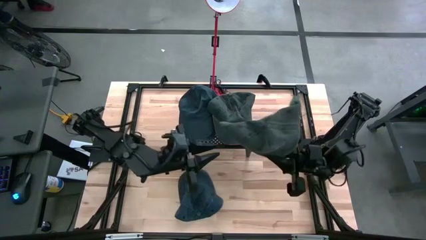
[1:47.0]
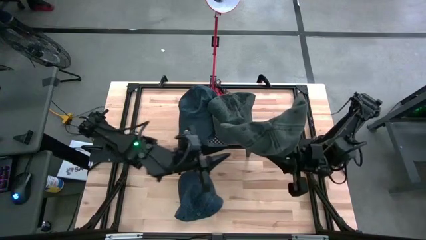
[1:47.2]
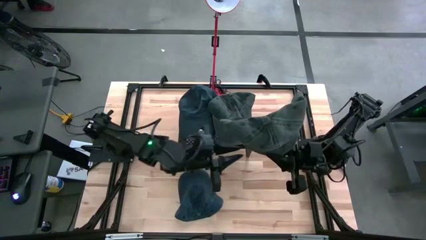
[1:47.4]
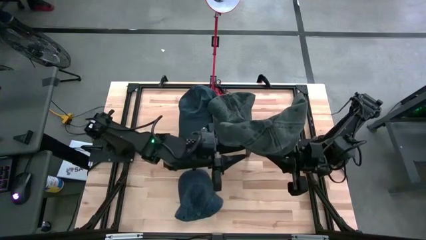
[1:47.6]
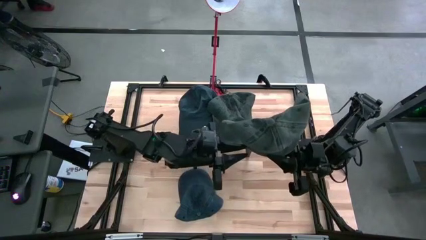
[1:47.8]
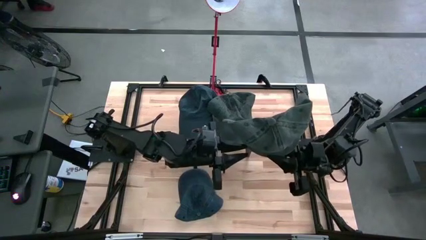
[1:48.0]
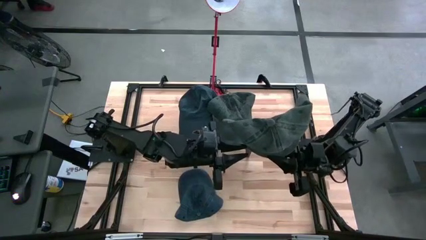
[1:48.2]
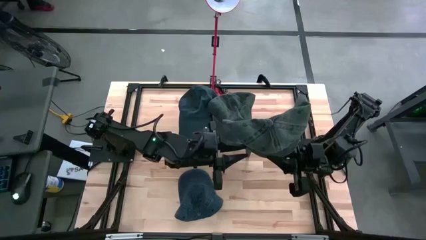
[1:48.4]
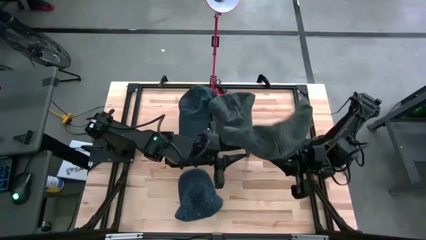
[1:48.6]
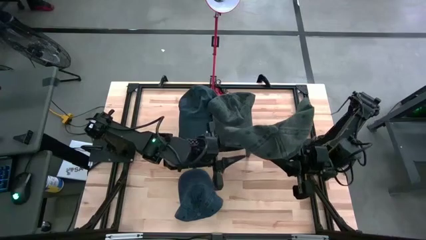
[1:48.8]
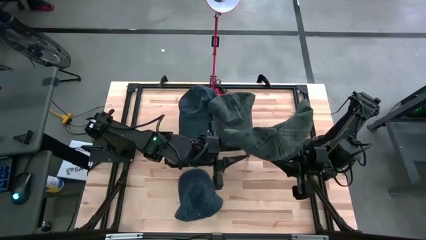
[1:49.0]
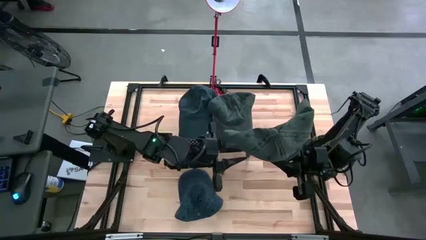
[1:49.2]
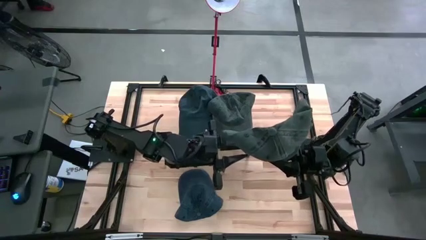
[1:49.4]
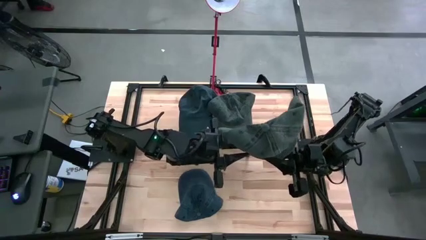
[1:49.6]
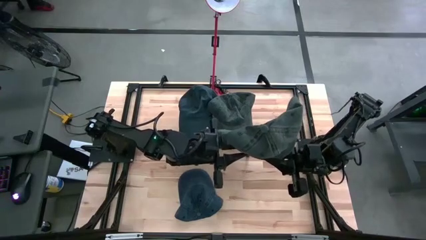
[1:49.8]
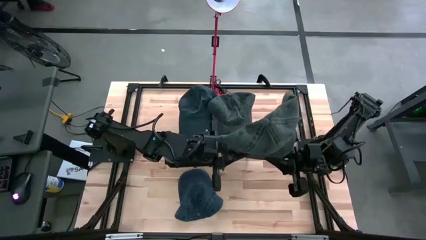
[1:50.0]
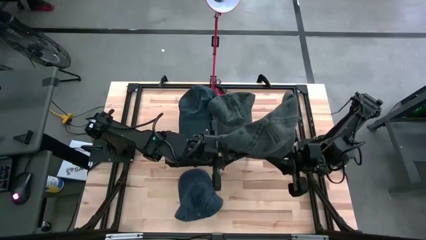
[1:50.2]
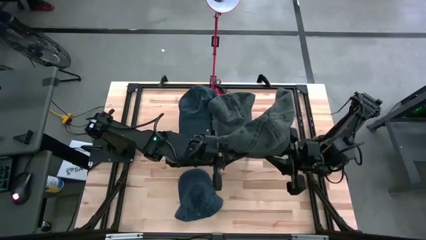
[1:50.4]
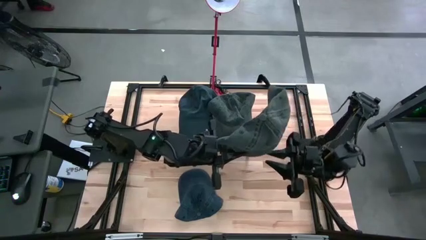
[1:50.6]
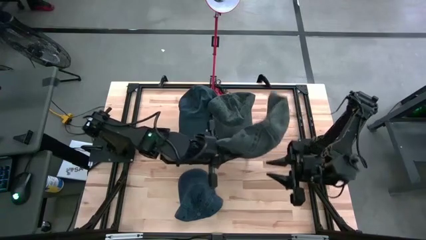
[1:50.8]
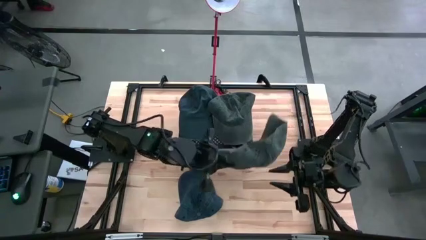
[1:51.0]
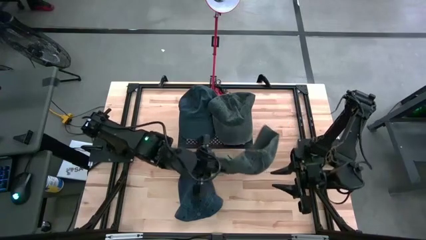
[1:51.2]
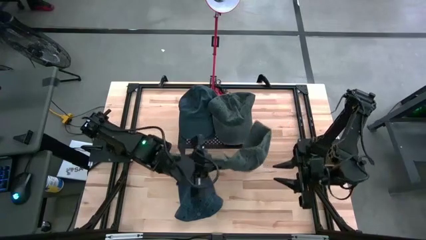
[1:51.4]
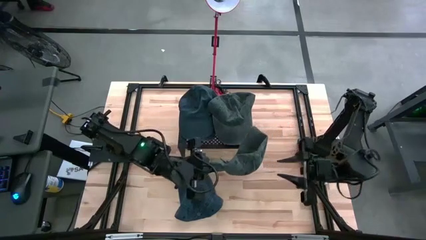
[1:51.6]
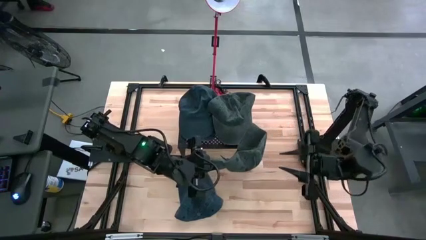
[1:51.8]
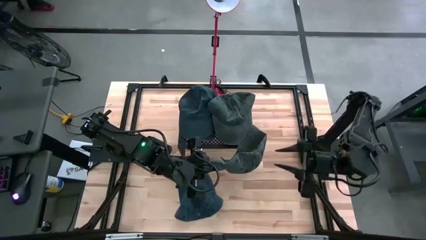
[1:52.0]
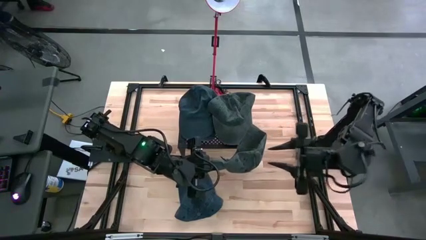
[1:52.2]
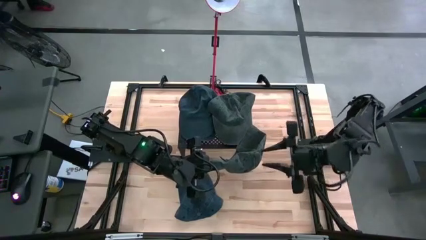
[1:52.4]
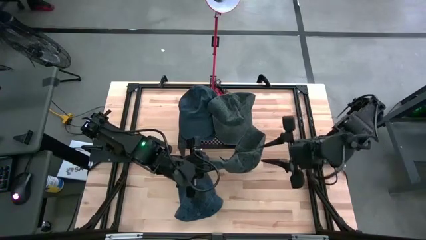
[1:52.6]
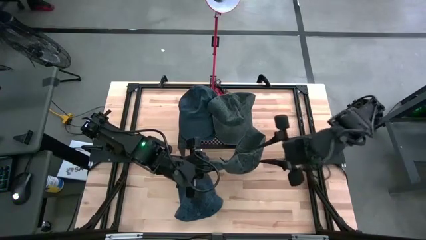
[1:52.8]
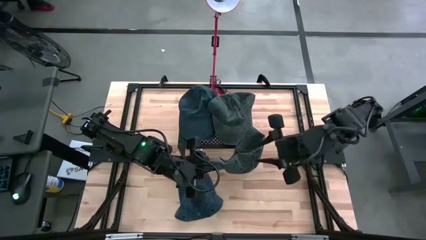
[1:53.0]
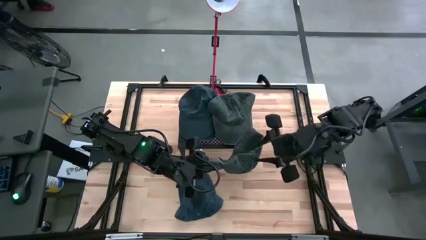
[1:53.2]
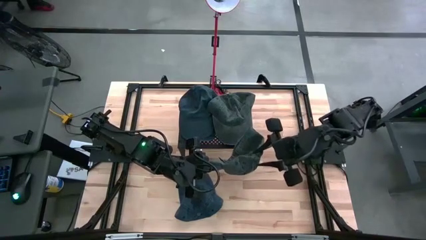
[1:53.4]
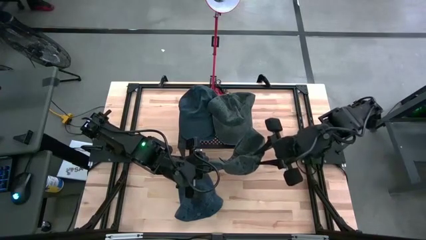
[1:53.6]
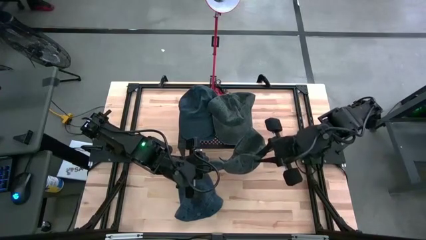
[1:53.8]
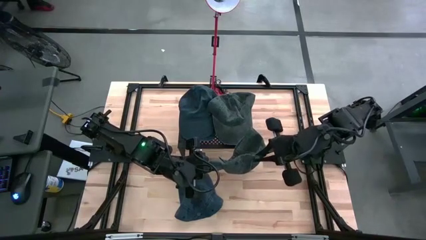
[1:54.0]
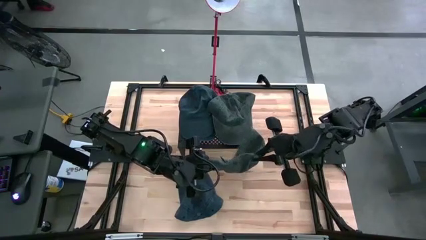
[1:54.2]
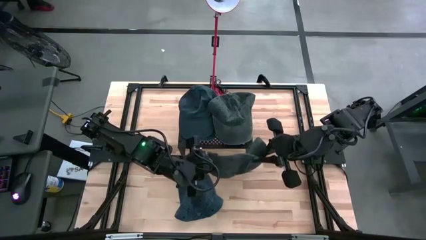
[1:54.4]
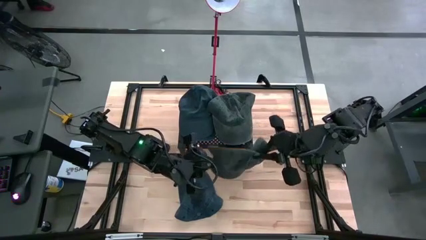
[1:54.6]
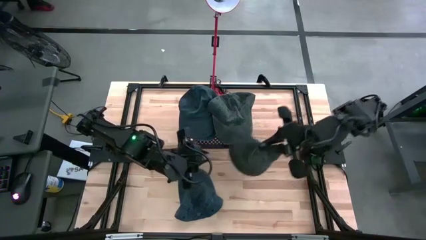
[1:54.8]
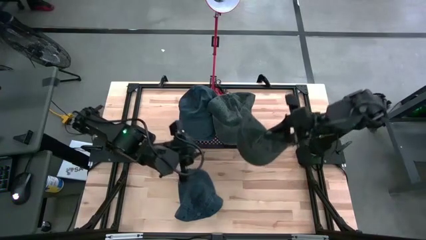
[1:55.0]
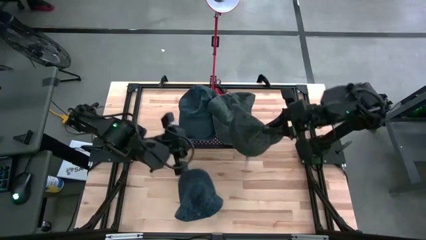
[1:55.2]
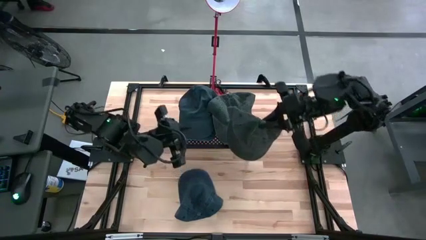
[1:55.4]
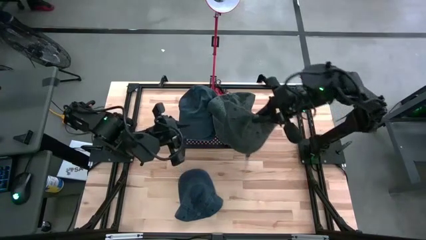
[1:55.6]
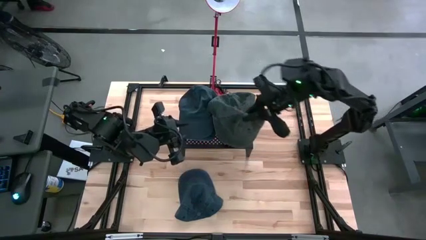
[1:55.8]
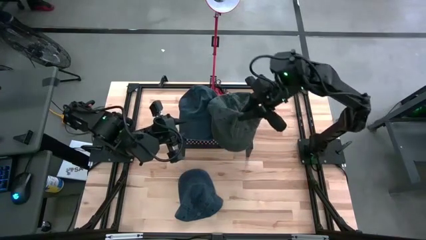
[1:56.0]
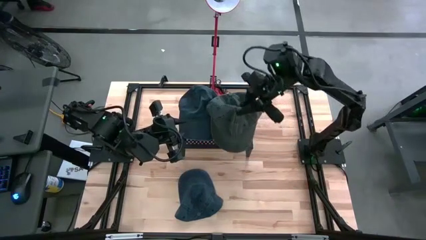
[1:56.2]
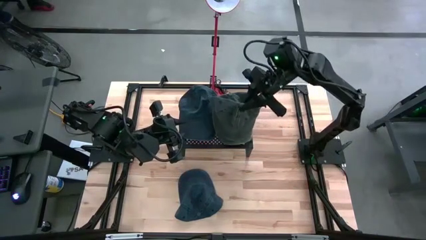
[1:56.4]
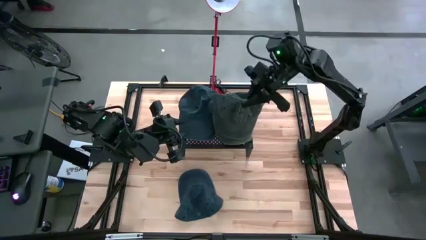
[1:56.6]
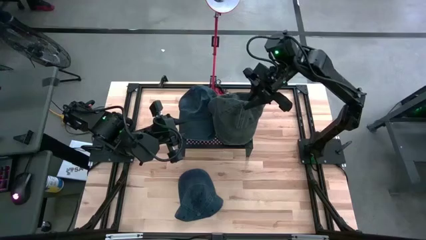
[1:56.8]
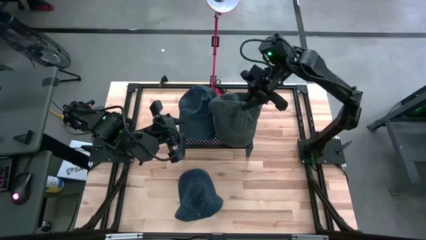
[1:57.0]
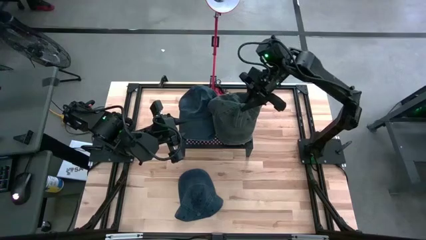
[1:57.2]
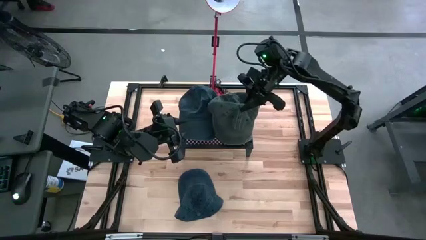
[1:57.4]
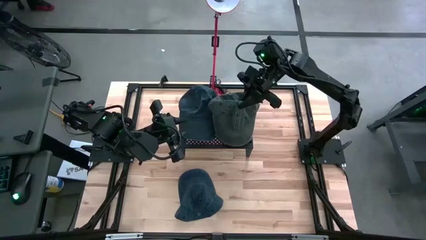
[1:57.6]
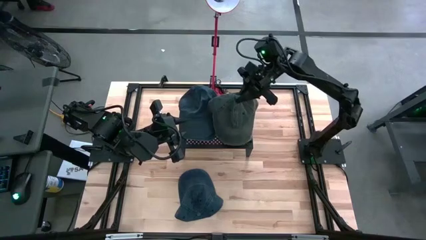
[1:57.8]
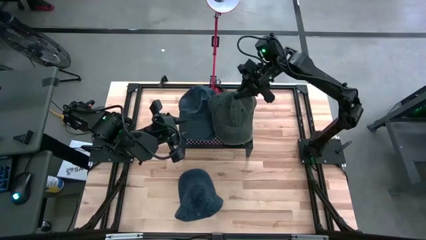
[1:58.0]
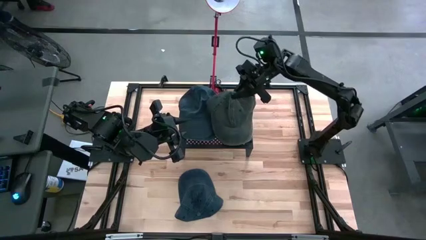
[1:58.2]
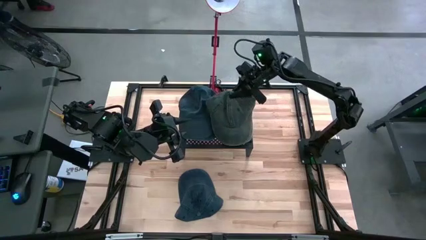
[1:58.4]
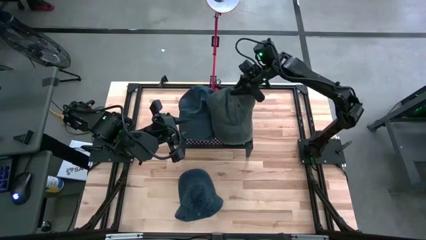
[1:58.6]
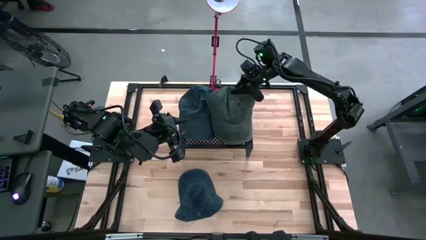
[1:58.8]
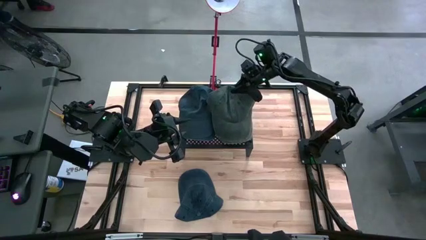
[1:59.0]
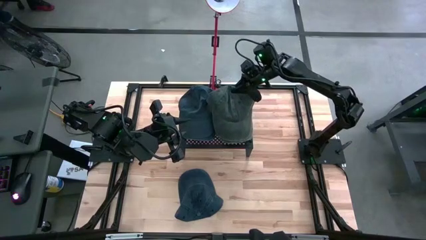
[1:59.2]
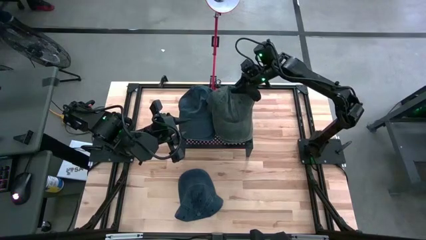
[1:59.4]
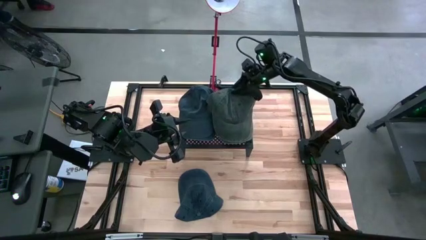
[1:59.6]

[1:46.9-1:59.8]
Task: Pick & Place hat
Stack the gray cap on top of the gray cap on the shelf

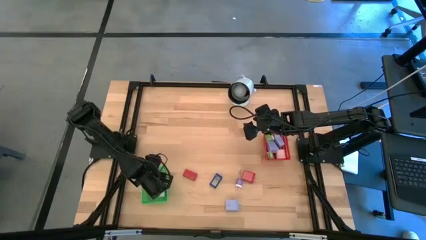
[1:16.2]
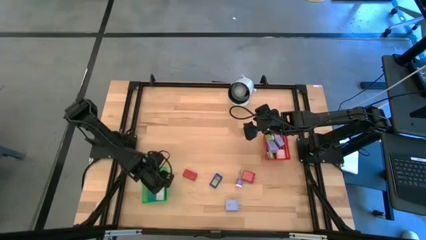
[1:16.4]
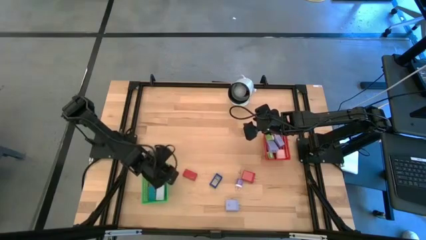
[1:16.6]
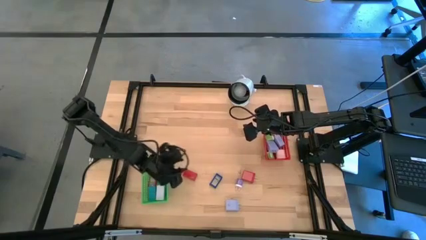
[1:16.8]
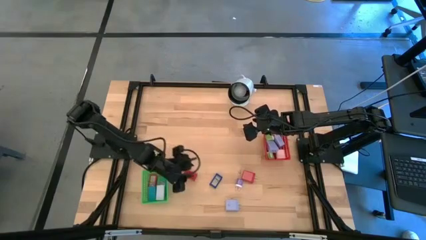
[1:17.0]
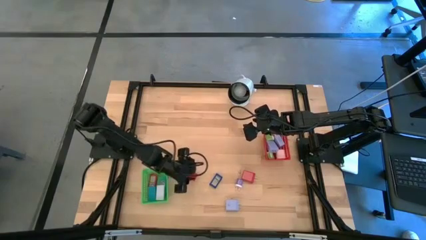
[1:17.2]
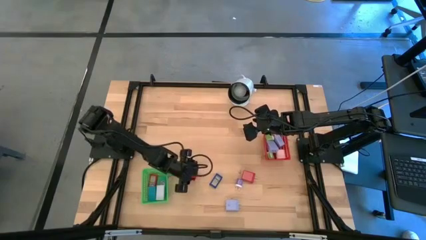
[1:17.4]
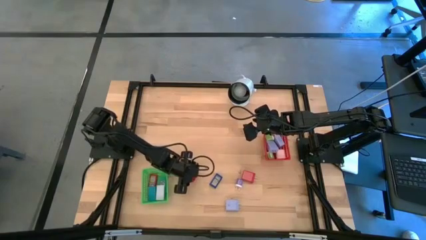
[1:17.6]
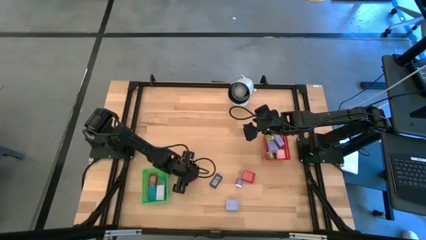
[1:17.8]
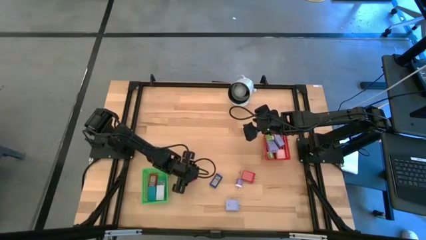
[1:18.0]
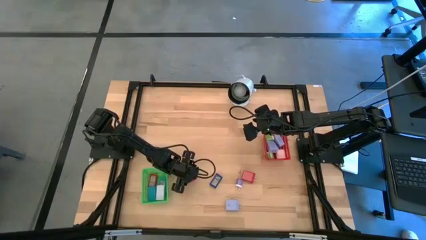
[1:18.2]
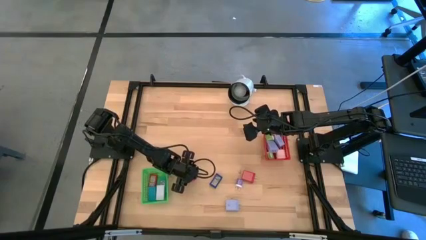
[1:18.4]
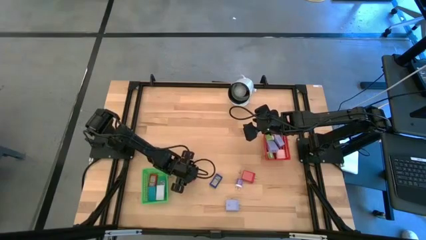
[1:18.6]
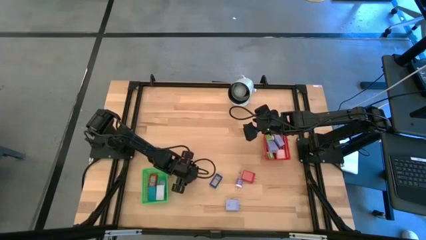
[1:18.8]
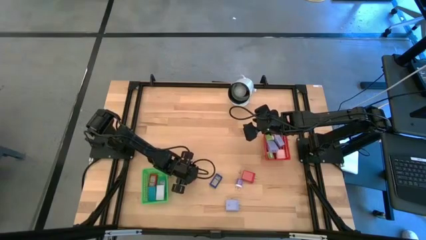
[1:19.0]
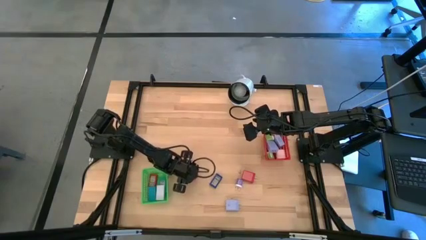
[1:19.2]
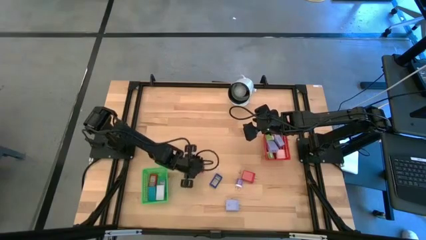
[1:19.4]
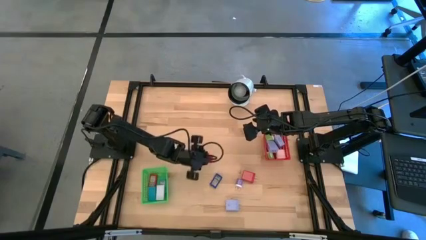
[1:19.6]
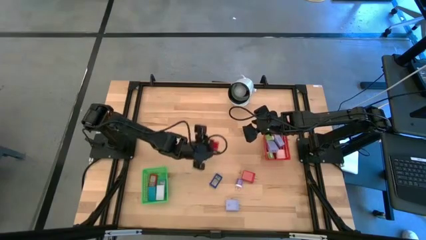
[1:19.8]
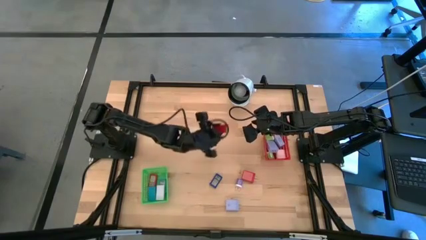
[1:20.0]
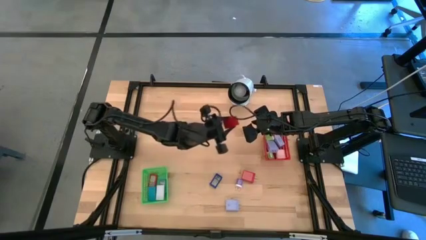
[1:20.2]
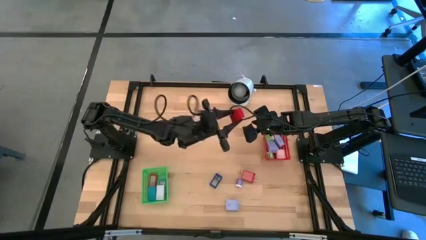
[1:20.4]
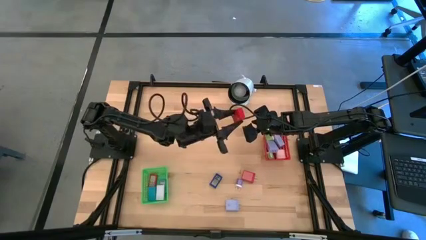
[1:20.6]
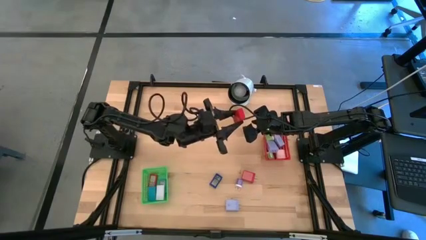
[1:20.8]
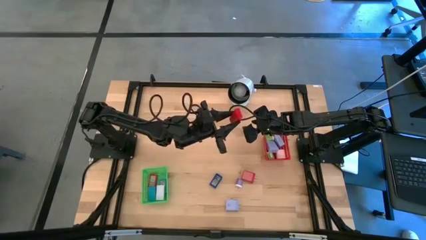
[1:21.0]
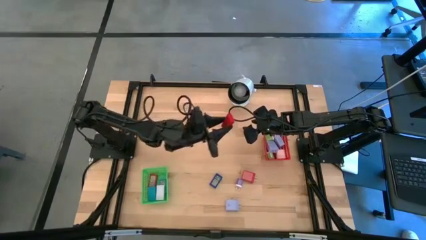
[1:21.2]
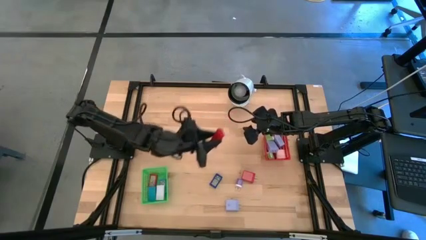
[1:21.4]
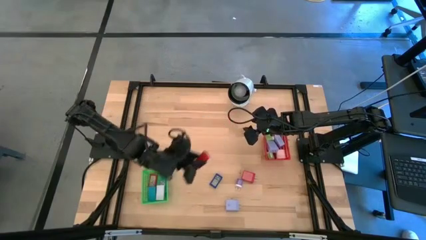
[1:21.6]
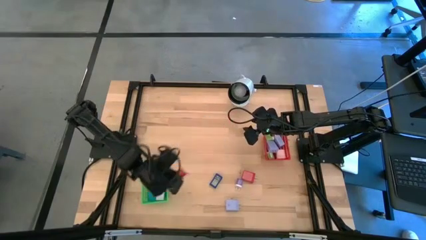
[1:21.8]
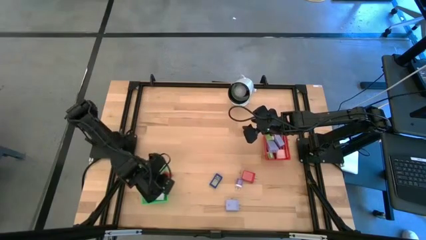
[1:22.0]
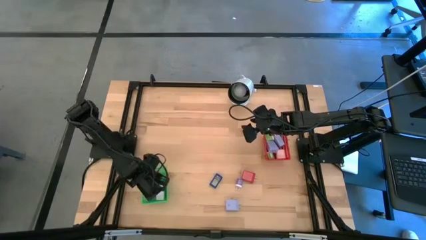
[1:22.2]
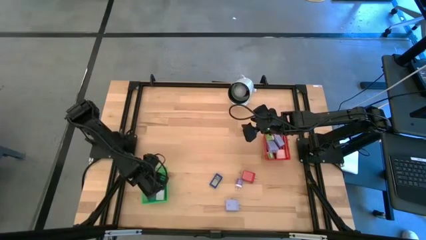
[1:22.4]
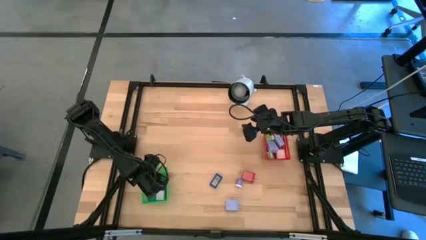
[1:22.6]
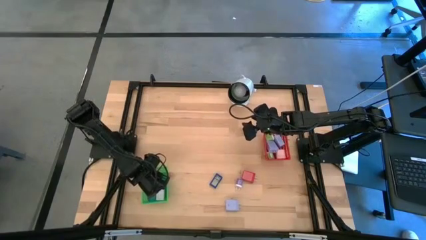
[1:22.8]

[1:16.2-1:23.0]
Task: Pick & Place Office items
Put the red digital clock into the green bin
